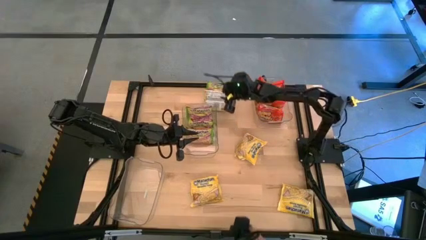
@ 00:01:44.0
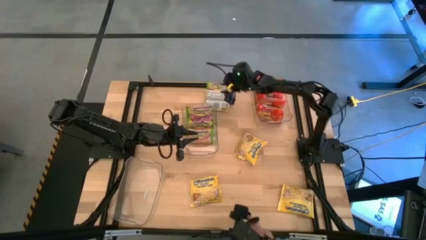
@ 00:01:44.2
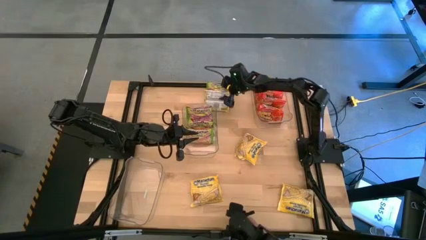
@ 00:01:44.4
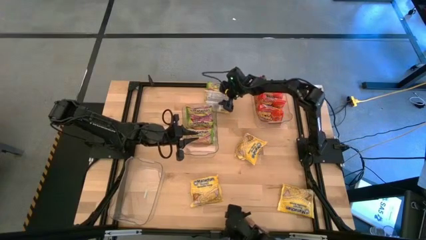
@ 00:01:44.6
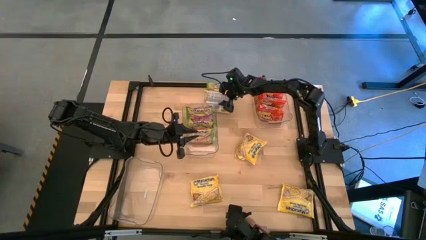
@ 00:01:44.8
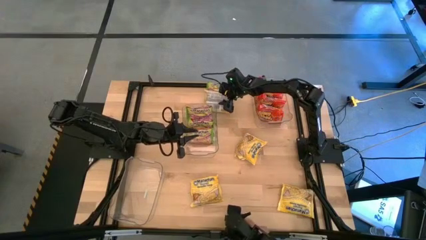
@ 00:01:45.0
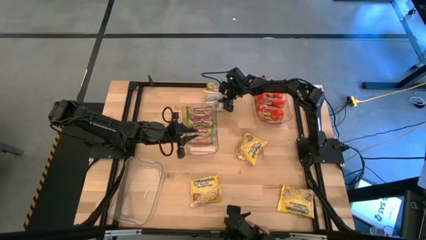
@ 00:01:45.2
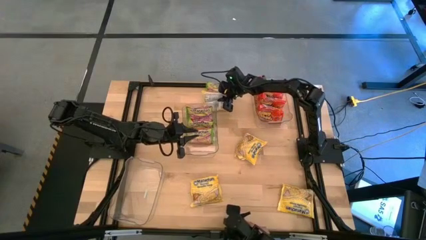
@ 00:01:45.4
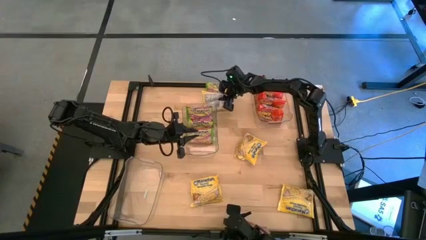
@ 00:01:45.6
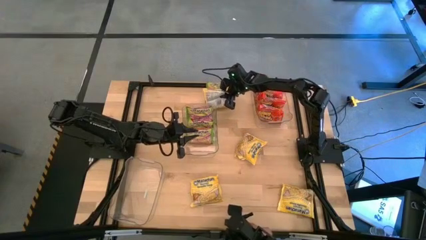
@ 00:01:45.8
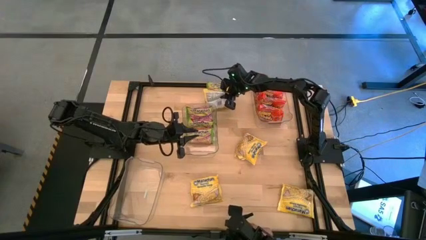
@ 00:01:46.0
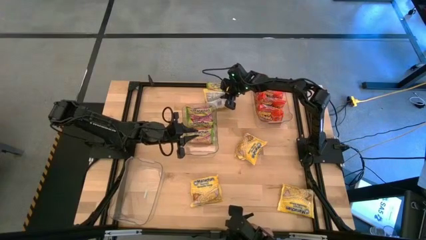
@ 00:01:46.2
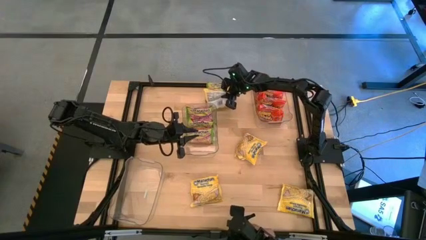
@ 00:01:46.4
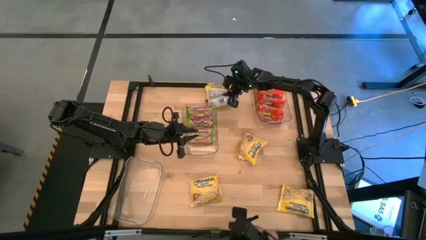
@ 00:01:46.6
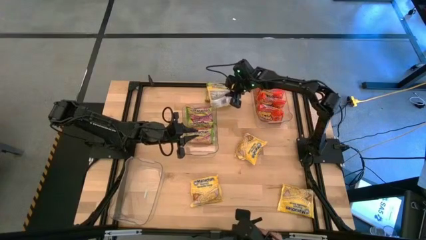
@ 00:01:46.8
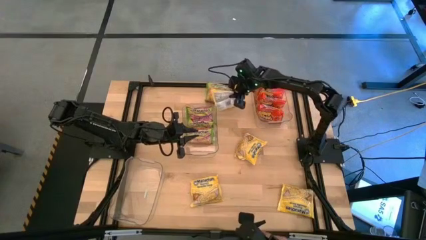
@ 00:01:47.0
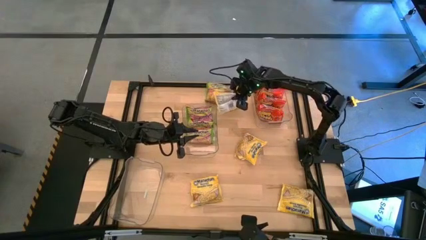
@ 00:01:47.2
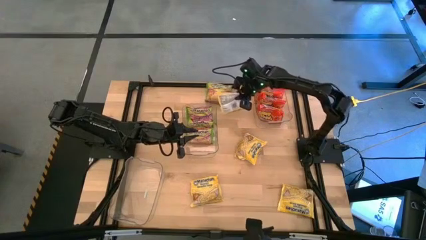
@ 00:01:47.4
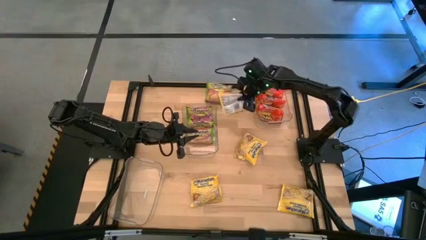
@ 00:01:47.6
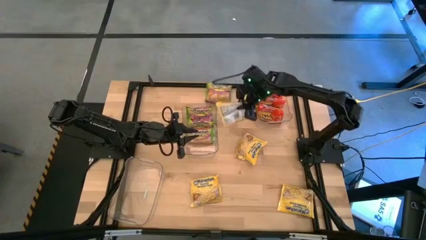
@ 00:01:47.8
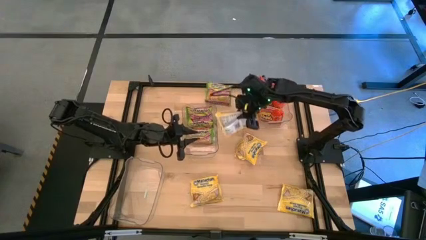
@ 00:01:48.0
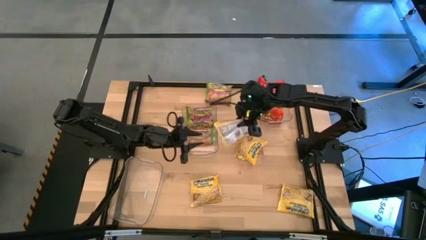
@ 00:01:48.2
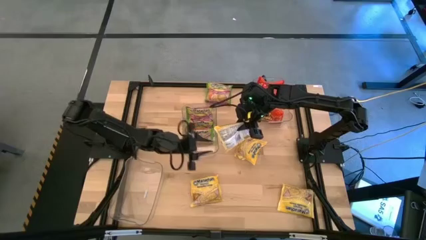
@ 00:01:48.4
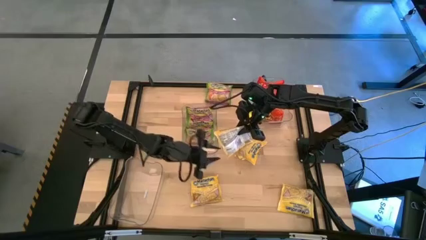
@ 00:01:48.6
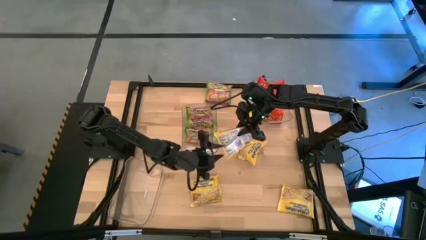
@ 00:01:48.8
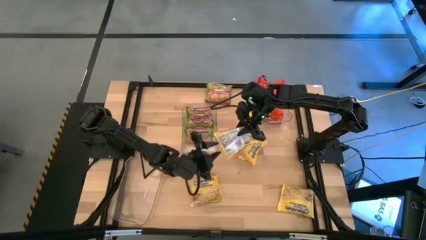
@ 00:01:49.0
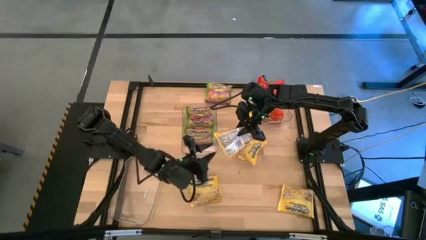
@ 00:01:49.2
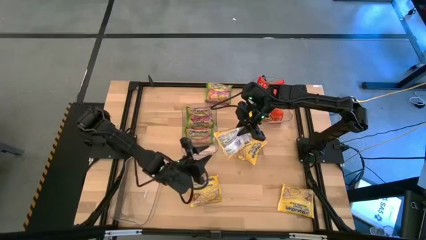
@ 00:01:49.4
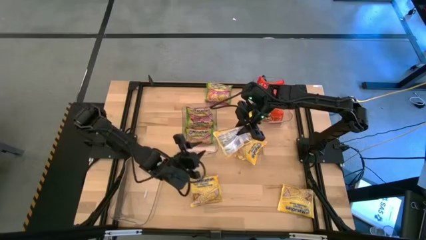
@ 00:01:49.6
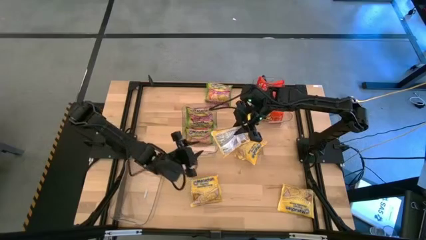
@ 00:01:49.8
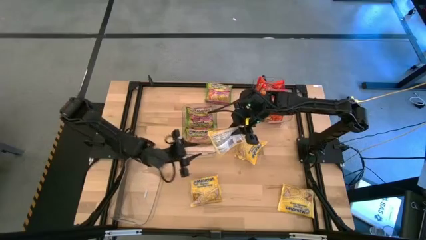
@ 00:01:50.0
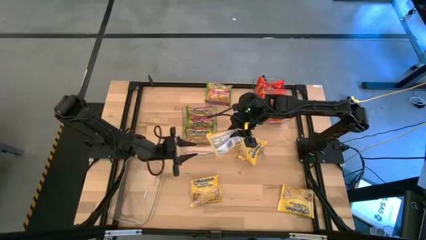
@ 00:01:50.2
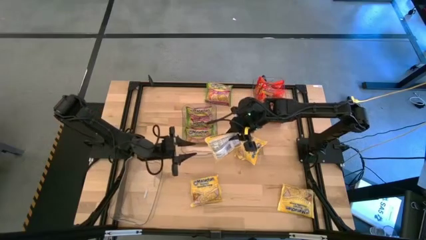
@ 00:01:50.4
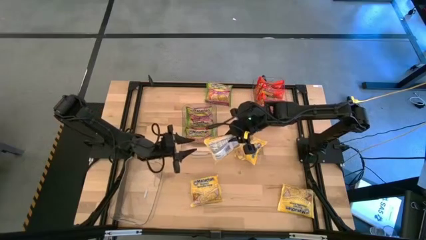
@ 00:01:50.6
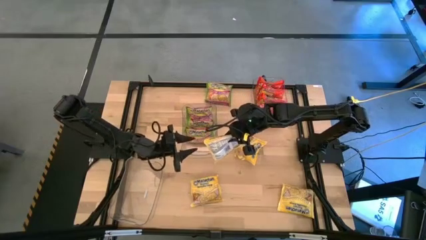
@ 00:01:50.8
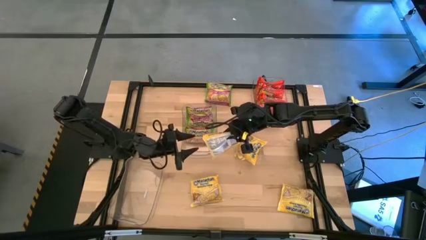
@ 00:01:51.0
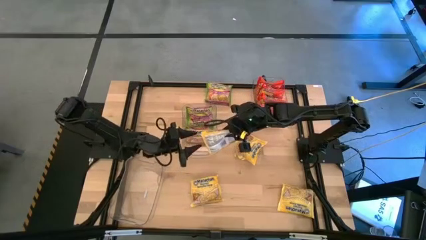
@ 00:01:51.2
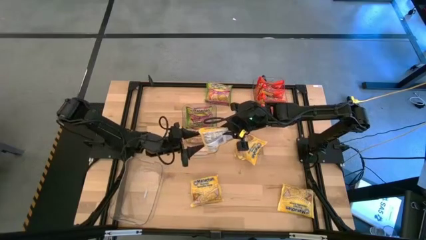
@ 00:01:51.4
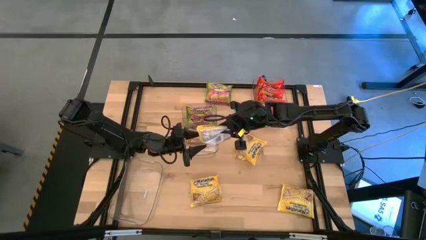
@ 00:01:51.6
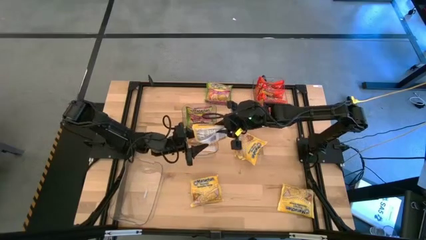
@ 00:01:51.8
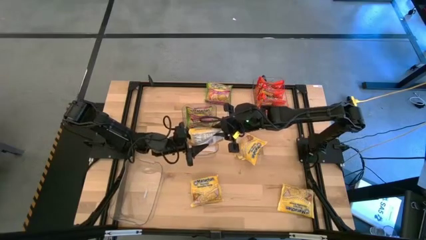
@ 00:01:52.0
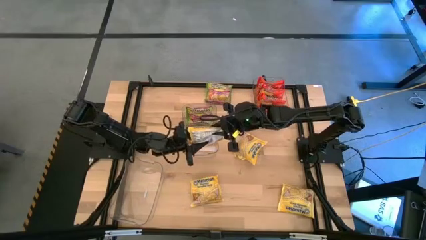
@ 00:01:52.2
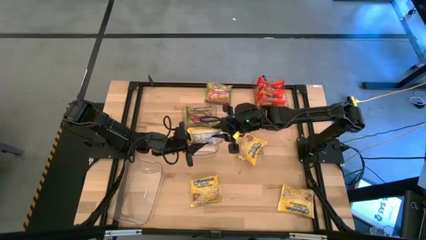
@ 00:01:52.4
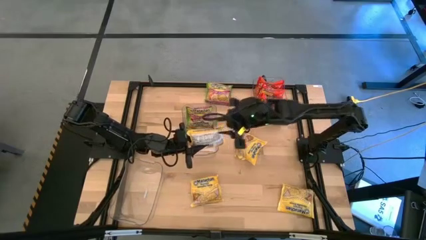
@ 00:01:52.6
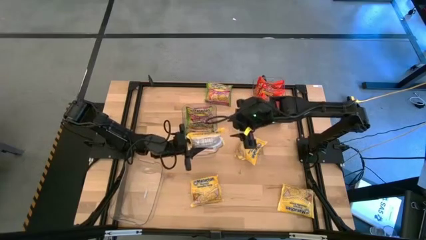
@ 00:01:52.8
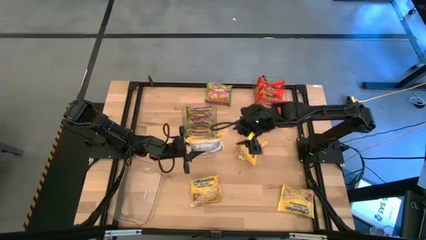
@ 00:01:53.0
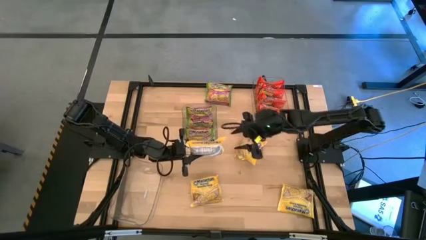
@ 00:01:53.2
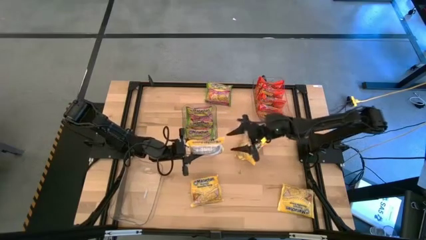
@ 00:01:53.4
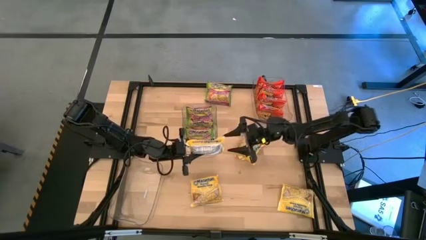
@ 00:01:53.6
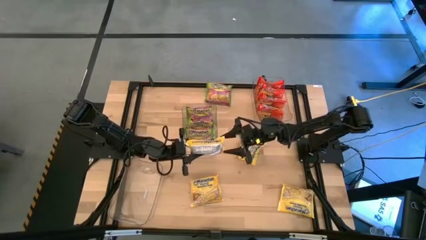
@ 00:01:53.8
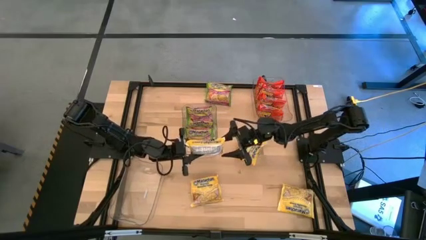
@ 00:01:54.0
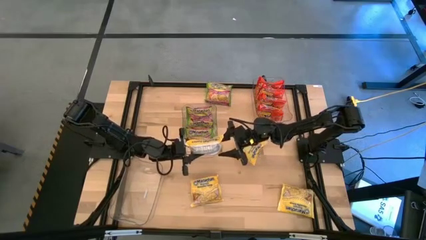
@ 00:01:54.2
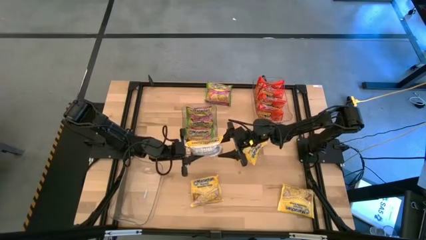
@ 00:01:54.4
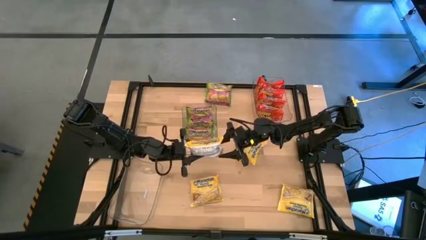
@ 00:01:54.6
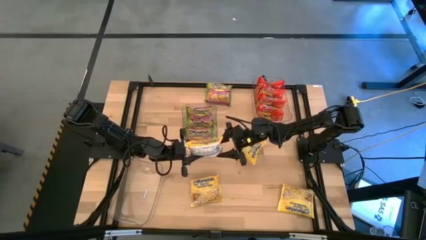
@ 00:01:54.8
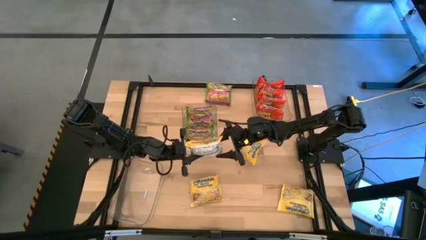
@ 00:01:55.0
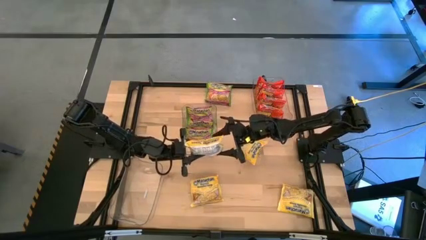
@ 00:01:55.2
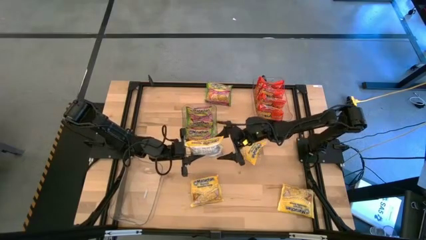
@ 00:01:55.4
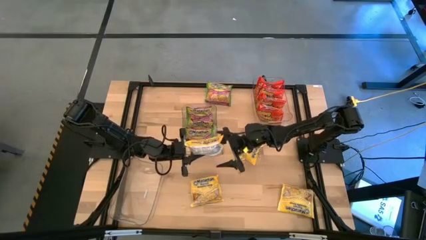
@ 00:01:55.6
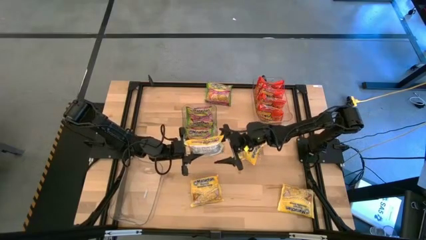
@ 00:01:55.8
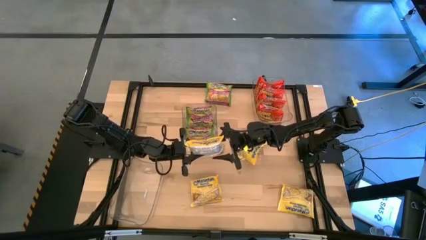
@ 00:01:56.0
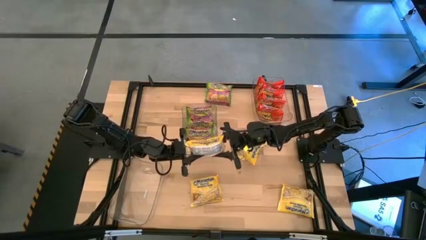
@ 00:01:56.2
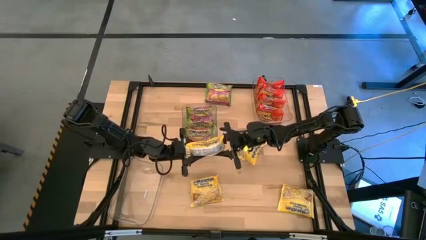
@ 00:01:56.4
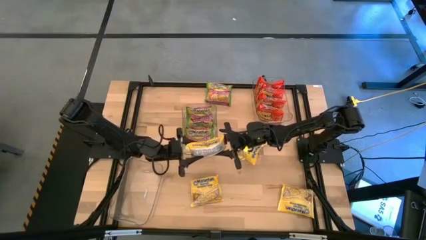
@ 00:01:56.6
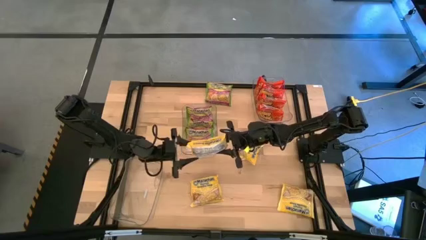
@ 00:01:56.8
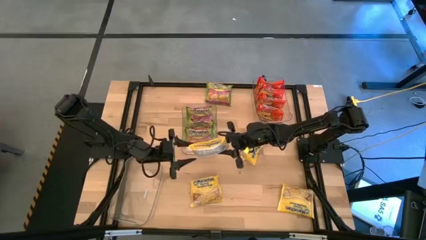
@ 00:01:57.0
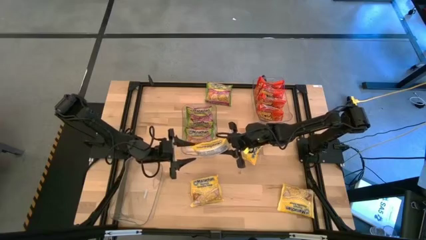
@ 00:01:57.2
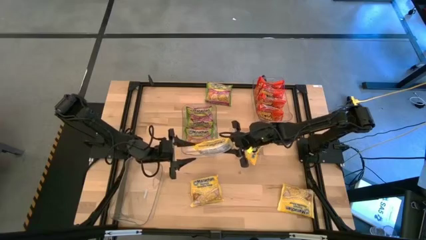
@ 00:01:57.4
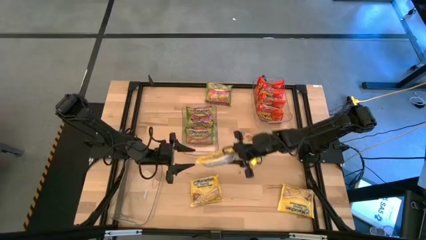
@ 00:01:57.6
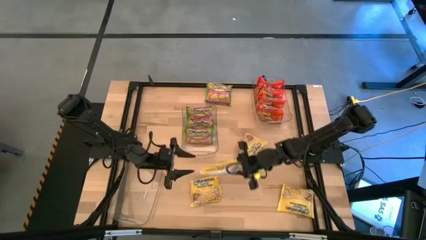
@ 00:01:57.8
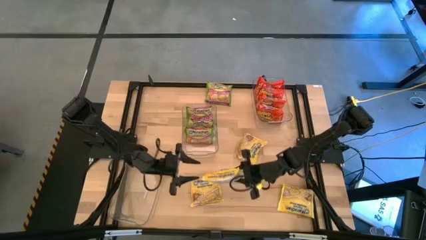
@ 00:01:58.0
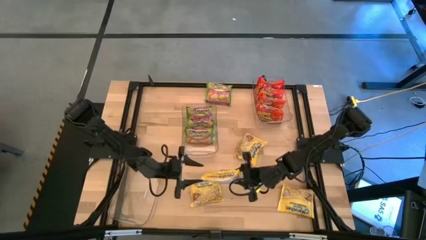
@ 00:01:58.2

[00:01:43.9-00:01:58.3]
Task: Sort Maruchan noodles
Put the yellow noodle pack into the bottom left transparent bin
